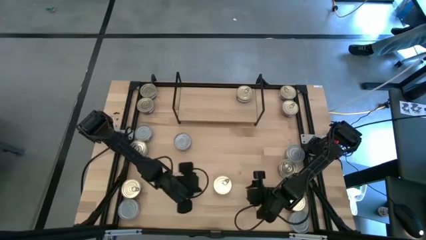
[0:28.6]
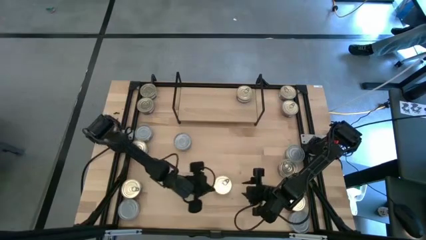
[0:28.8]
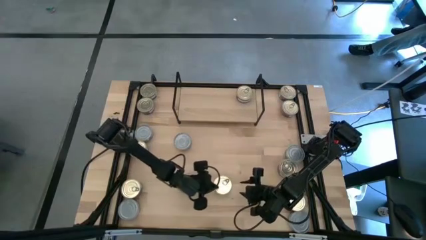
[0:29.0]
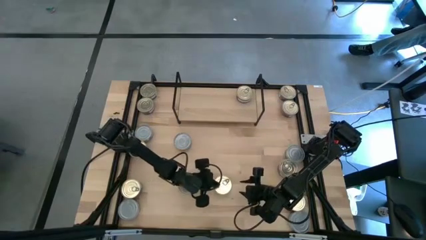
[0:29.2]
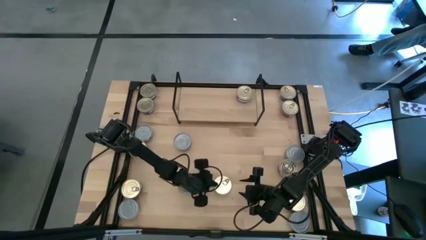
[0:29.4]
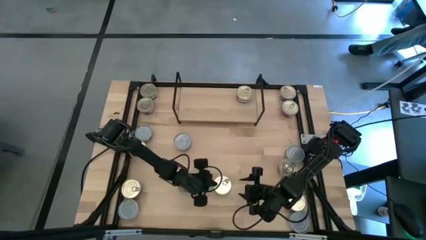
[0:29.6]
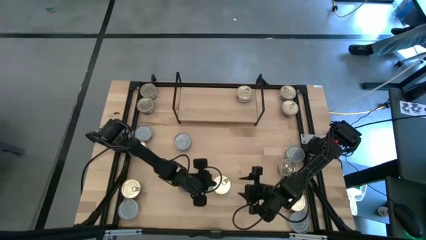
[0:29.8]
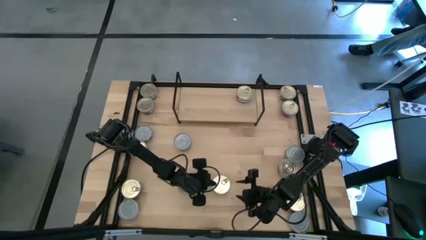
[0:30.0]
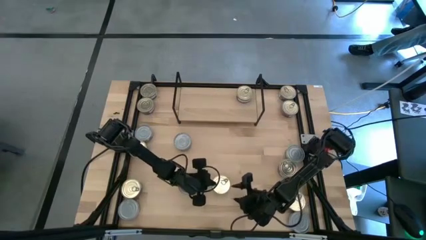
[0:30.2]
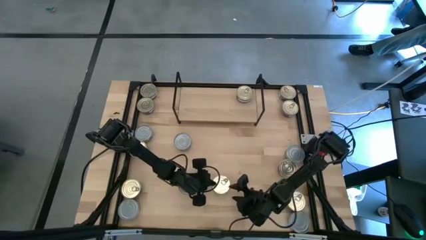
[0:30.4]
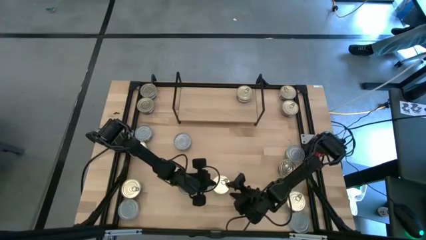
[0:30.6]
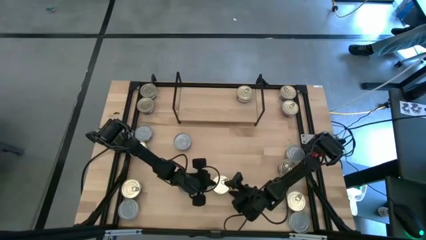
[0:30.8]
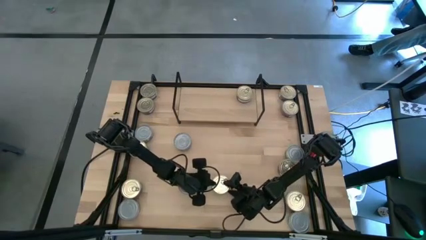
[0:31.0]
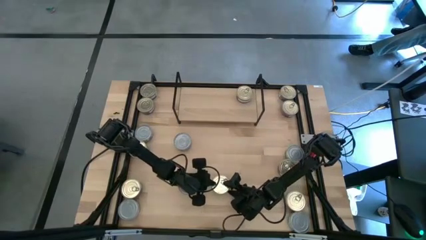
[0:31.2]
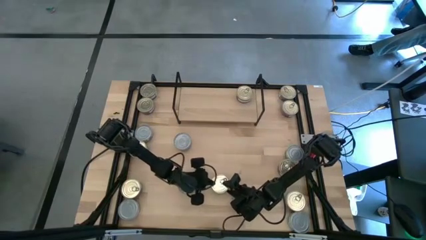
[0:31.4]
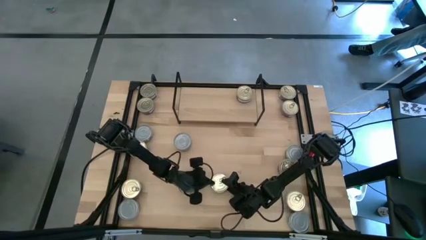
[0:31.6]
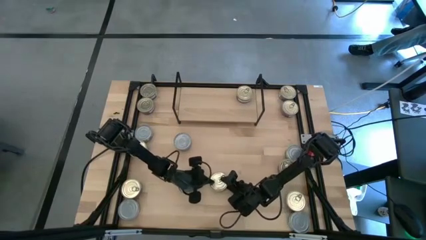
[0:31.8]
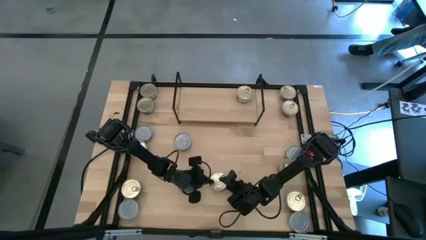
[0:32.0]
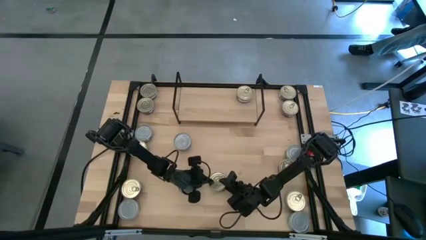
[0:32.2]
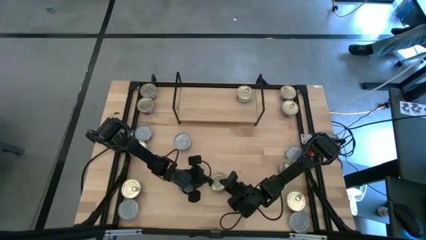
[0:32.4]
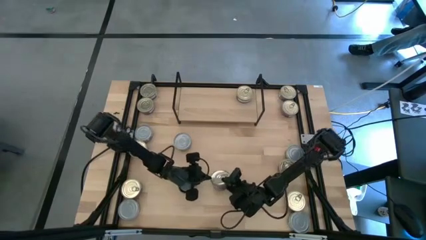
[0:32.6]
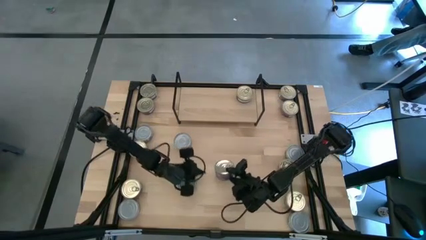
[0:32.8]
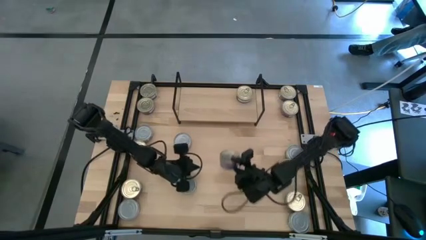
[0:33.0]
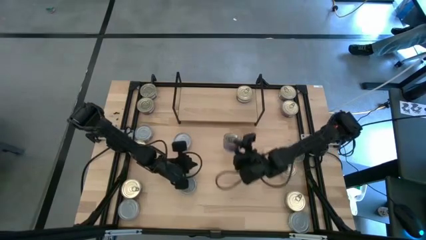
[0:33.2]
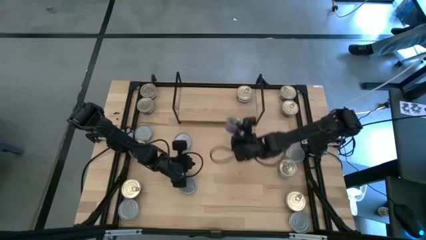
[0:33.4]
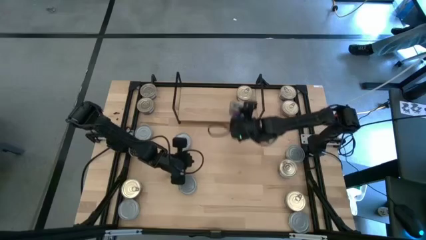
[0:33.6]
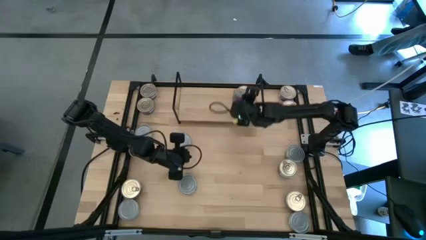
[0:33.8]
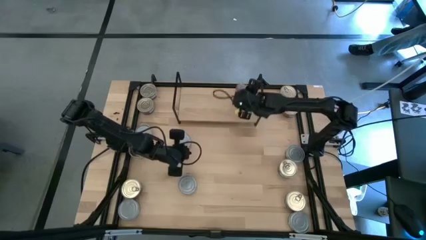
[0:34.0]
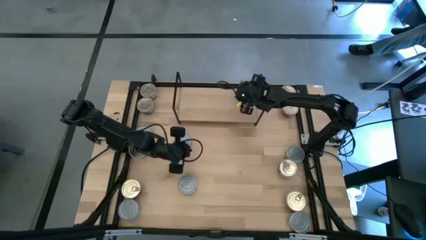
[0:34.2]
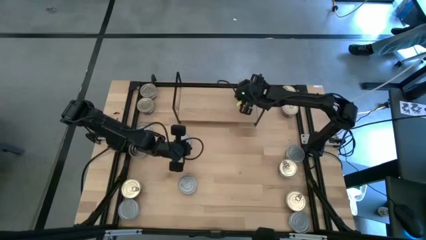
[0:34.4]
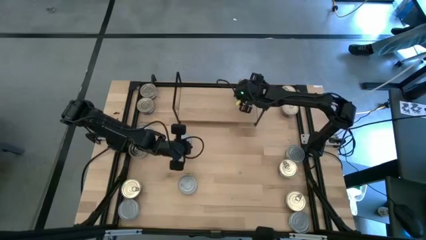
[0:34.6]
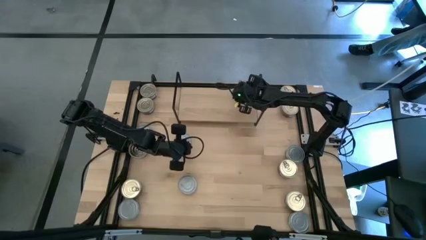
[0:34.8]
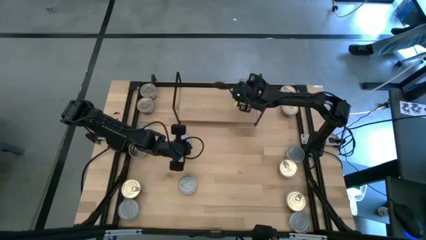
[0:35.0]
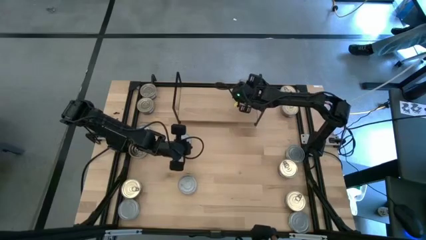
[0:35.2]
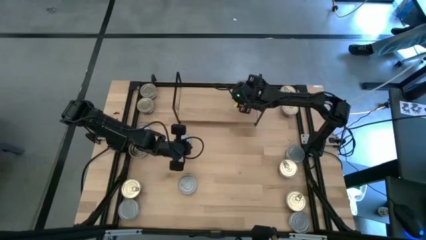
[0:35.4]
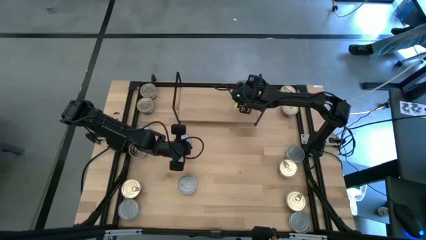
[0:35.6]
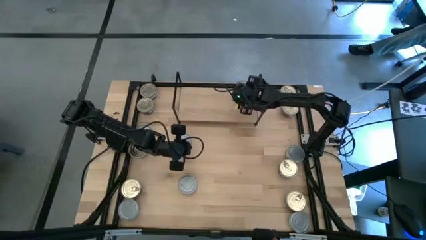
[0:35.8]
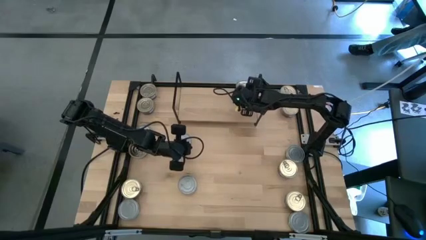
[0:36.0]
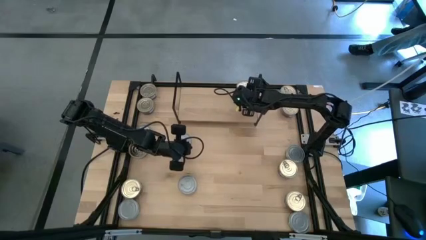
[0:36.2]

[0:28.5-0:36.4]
Task: Stack canned seafood by type on shelf
Stack the blue pink tuna can on top of the other blue pink tuna can on the shelf

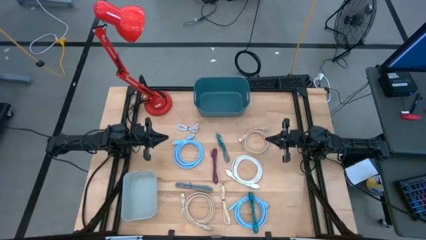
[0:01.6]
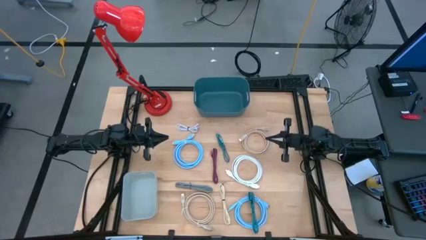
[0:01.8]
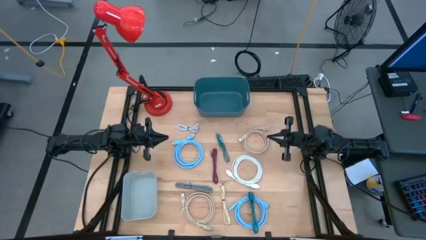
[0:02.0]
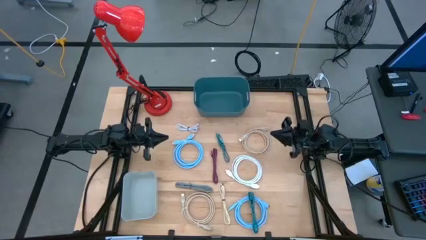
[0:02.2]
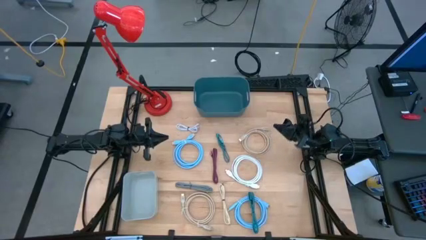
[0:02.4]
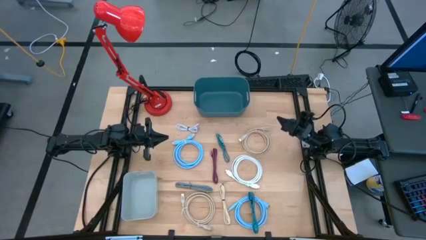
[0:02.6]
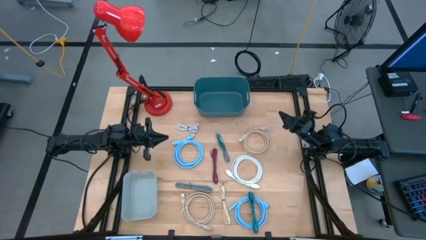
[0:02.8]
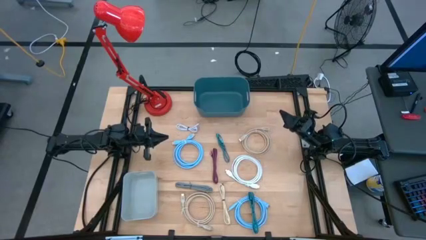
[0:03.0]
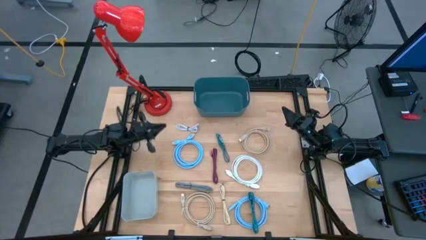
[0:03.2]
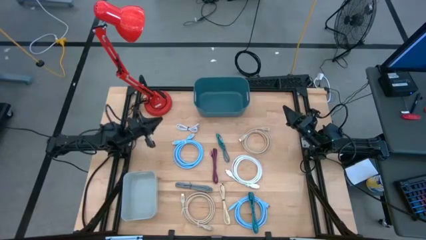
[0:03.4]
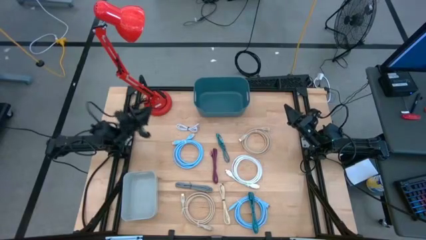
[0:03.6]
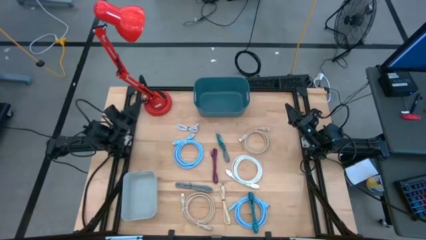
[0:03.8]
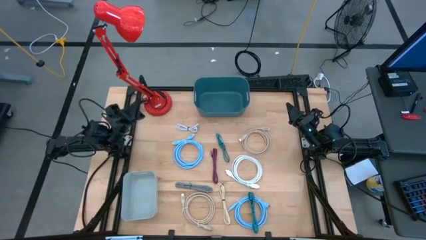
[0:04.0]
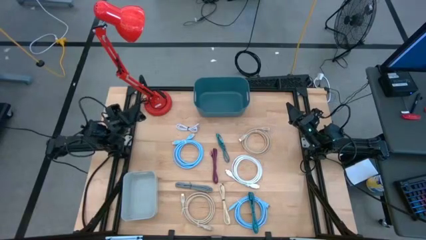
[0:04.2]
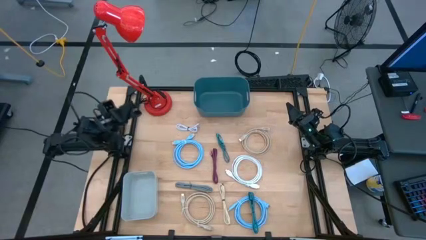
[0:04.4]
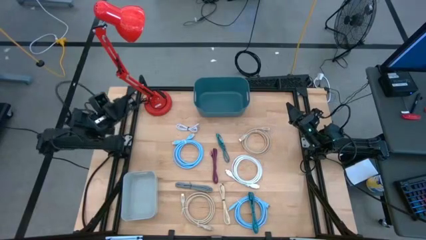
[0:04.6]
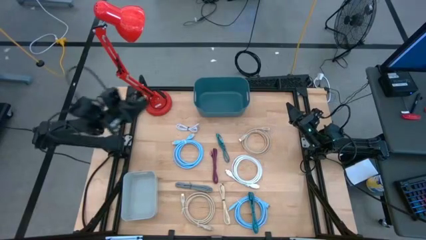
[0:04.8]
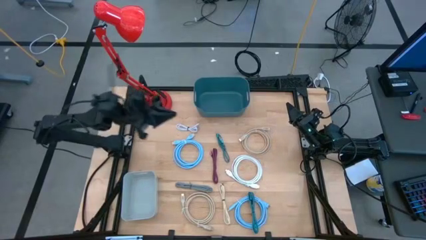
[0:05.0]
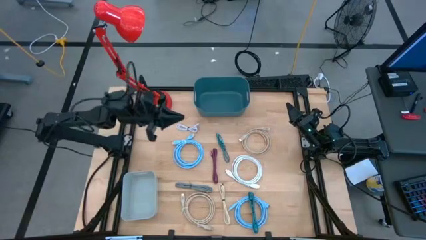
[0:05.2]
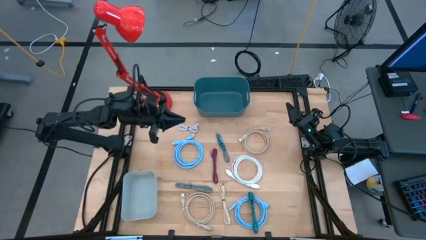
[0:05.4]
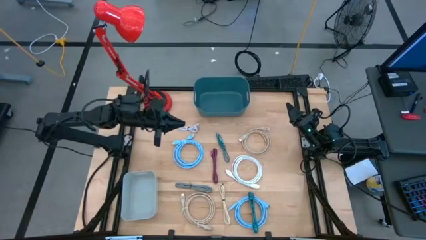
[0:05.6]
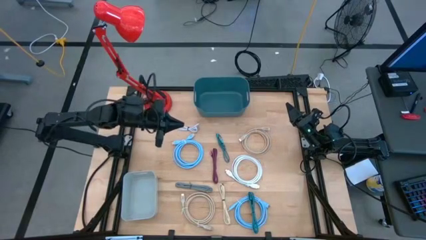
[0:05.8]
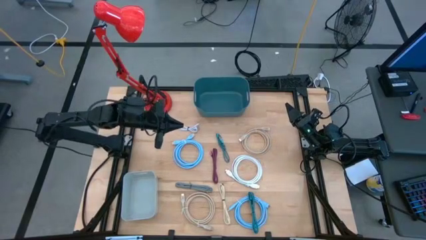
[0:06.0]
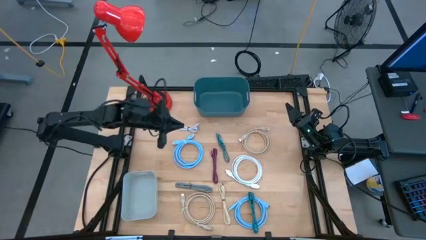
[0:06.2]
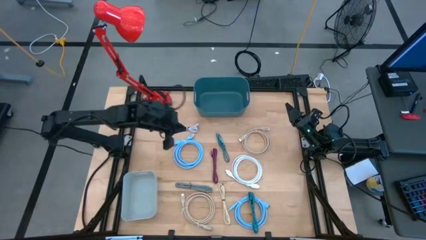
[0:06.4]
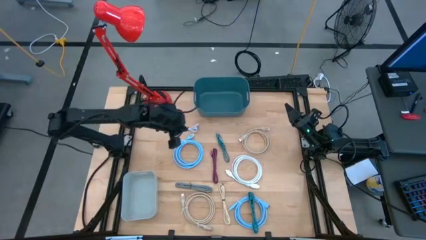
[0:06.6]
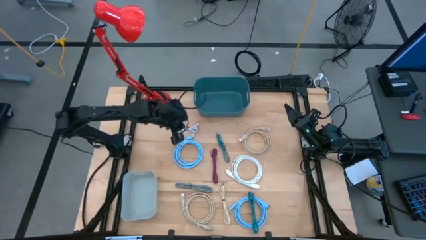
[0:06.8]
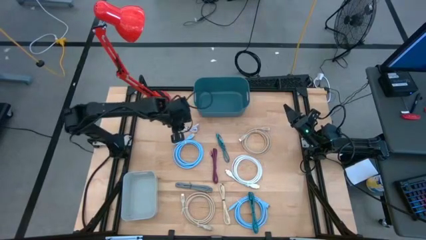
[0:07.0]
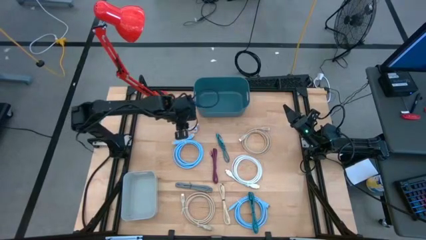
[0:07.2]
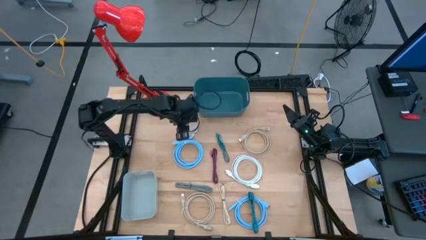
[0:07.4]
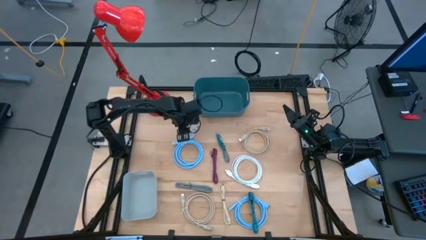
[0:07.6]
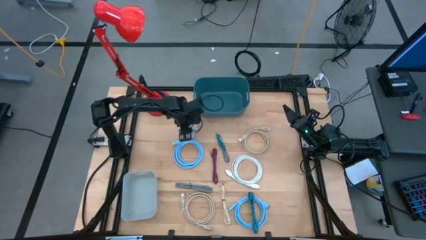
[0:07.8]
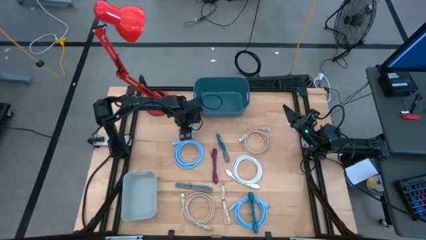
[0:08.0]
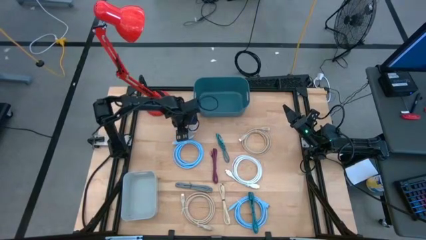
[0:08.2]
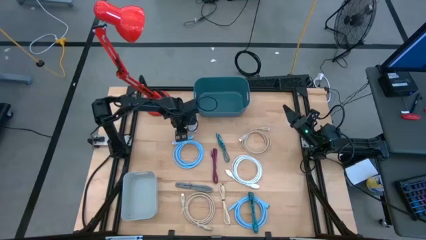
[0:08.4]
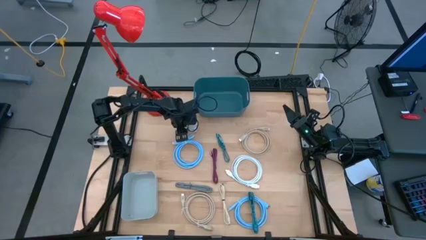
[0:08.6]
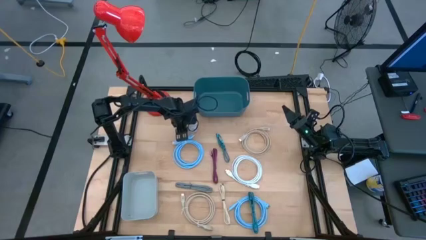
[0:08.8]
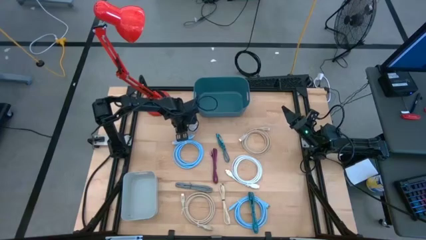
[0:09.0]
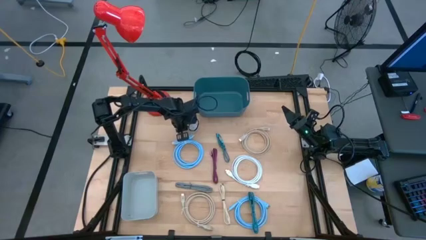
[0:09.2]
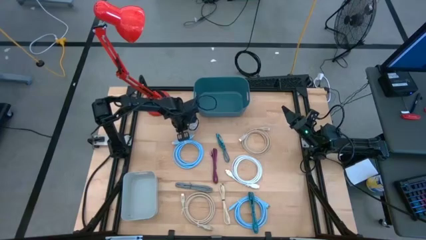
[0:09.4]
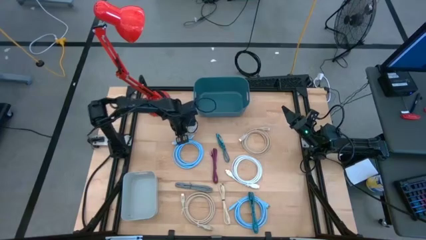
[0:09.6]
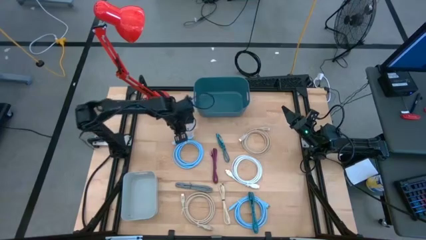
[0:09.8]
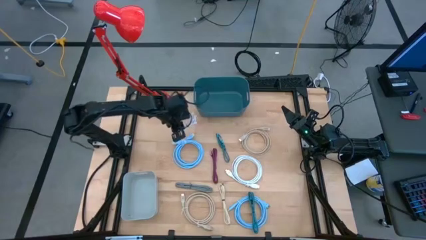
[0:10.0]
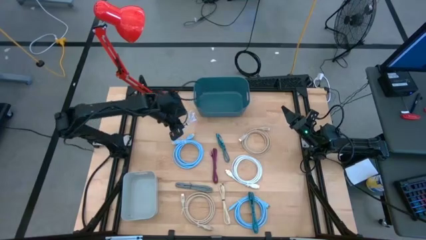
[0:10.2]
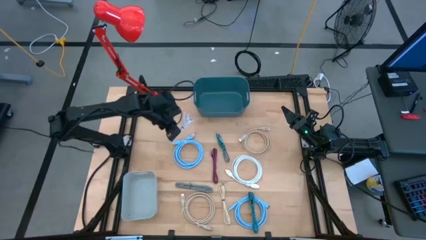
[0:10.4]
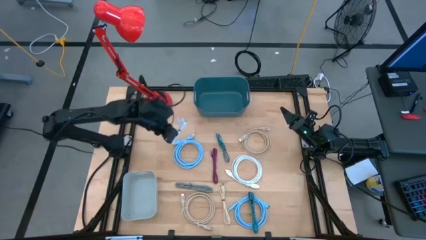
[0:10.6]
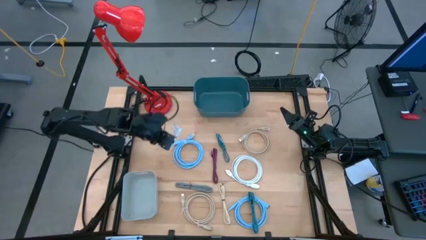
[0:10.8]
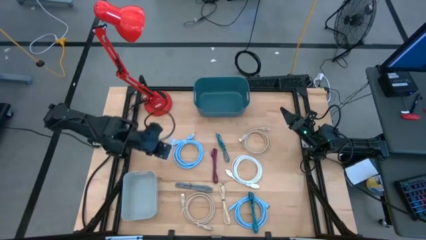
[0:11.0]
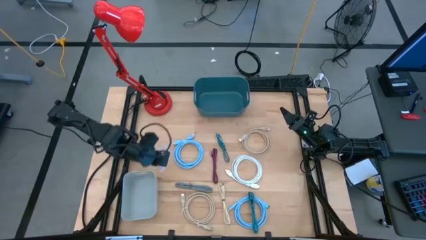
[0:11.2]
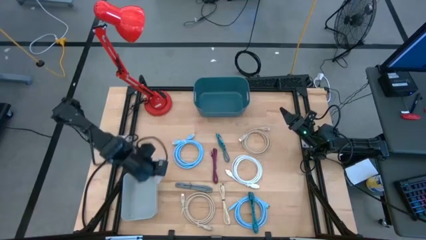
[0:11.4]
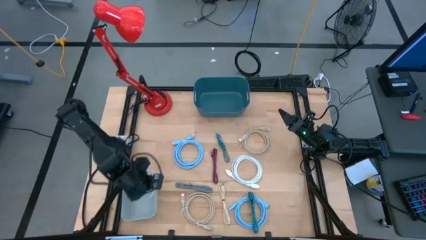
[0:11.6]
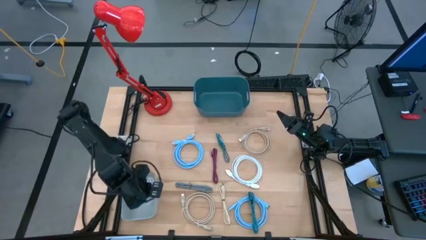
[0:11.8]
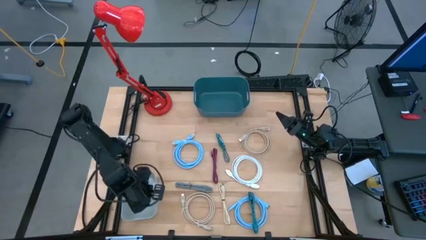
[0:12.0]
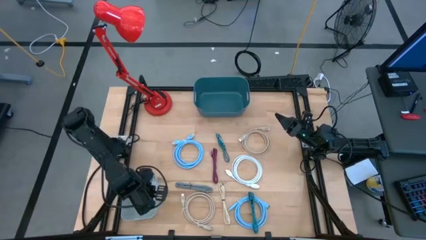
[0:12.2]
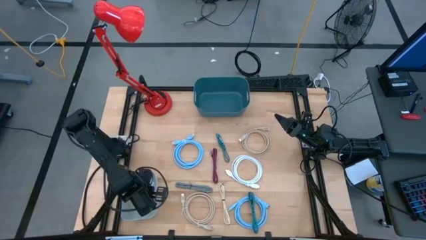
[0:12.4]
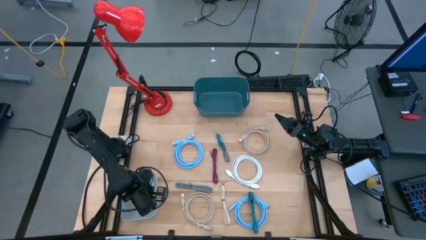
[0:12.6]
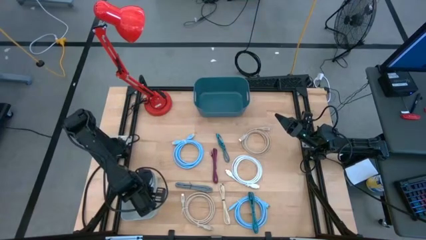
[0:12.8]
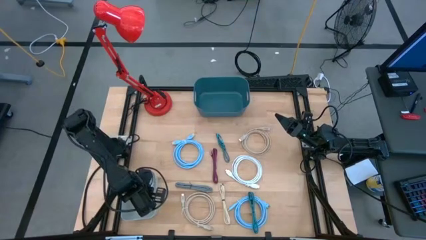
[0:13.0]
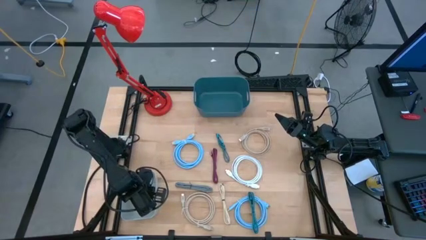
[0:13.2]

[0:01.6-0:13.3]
Task: Pick & Place USB Port
Put the white charger cable into the gray bin
